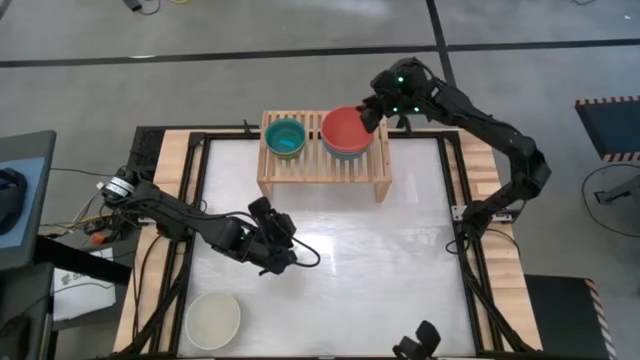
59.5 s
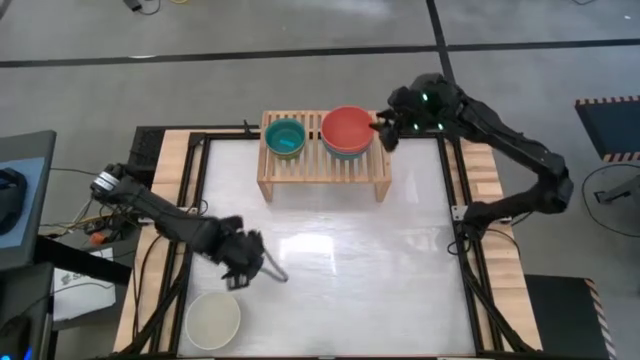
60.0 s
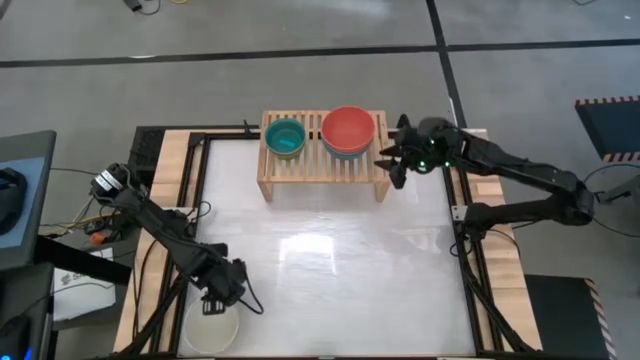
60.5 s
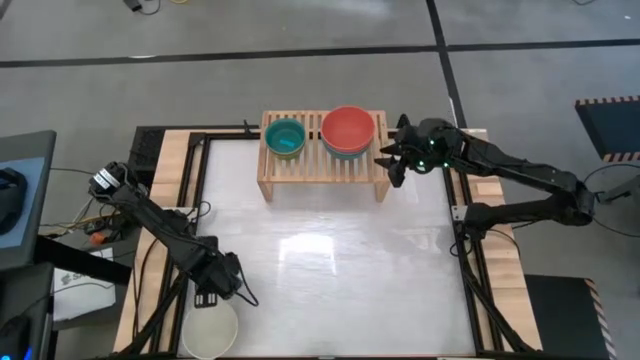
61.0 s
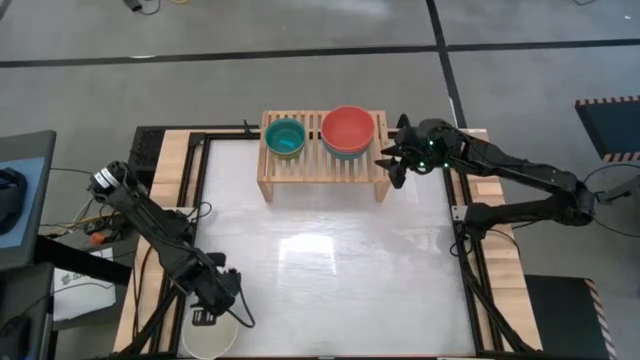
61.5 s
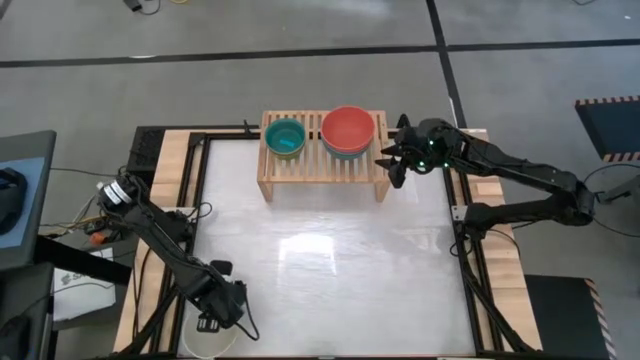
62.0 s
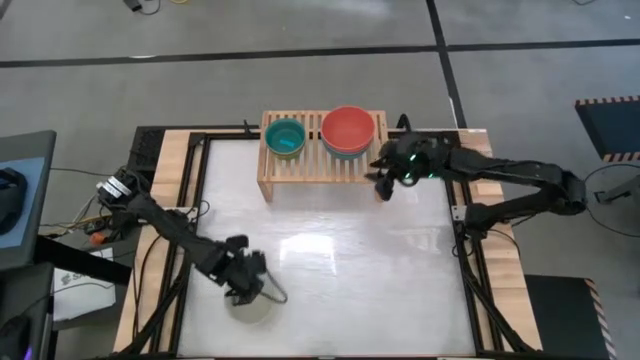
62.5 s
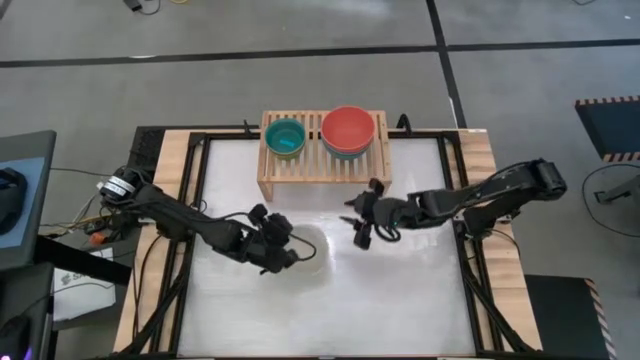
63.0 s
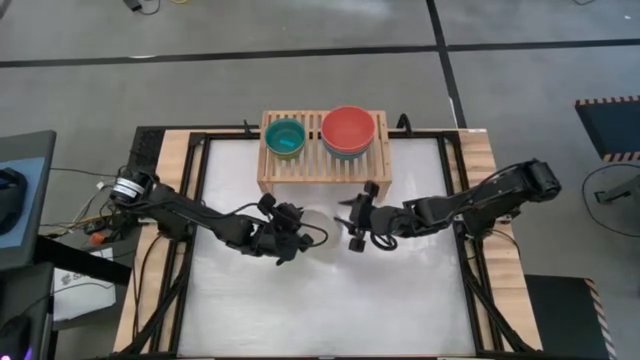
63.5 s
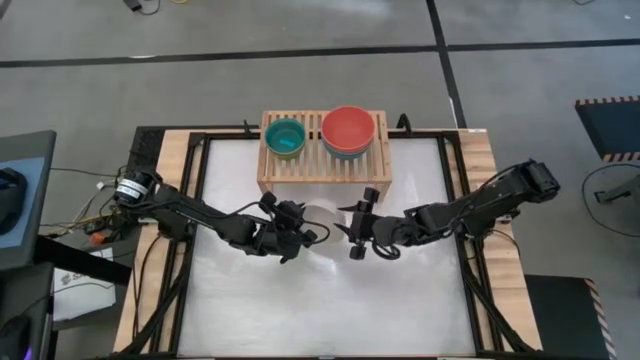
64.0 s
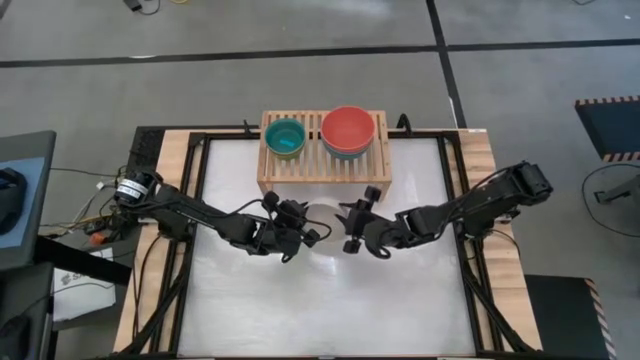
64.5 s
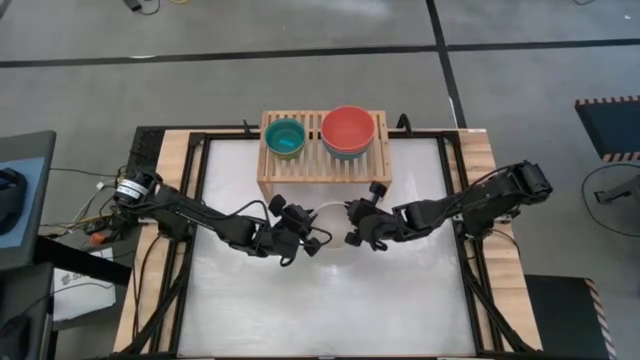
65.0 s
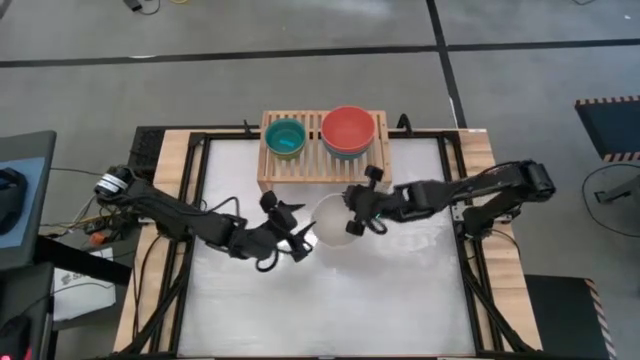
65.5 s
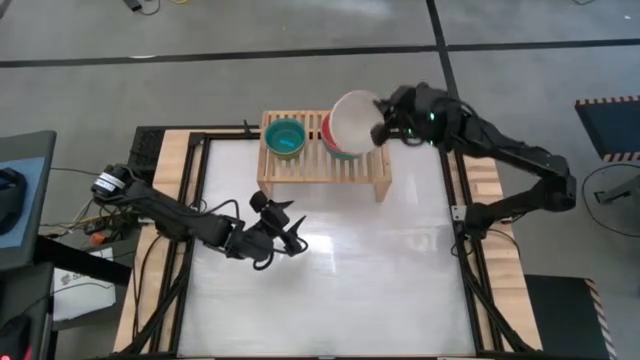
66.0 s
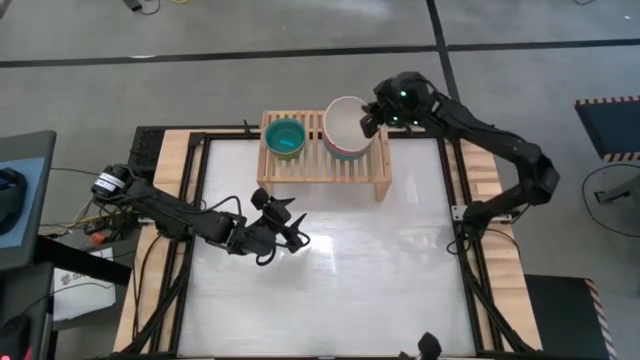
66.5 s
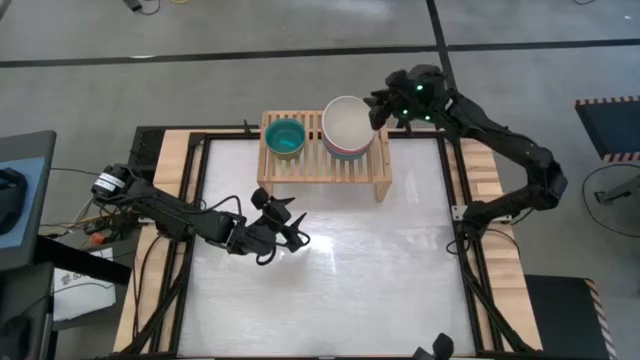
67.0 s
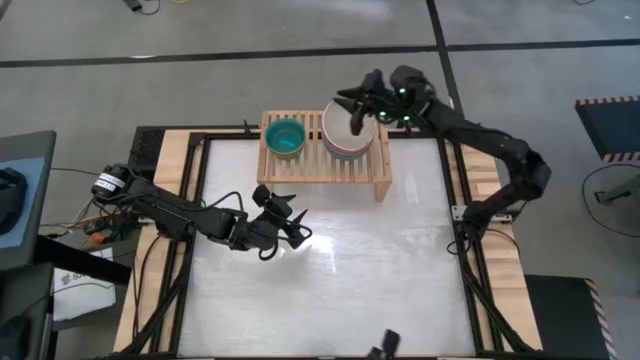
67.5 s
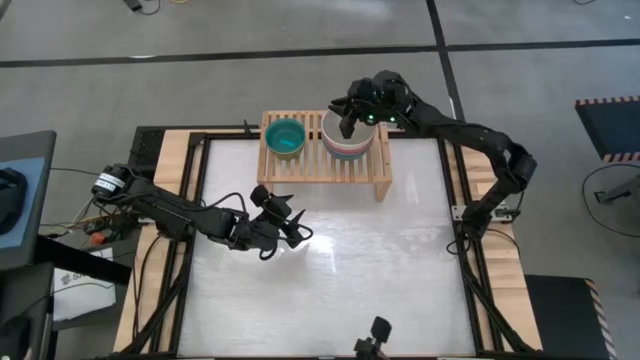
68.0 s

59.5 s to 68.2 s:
Task: Place and stack bowls onto a shelf
Stack the white bowl on top of the orange bowl

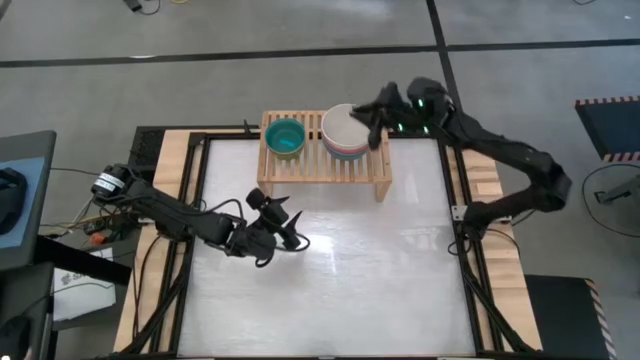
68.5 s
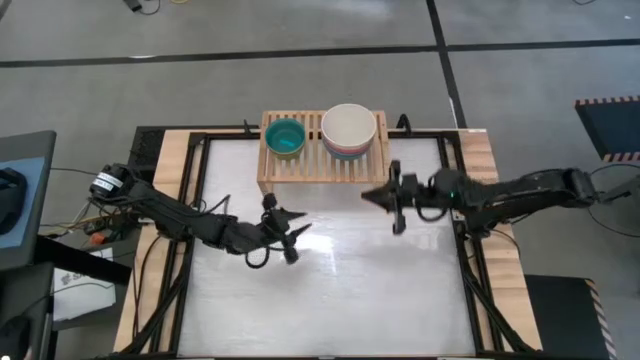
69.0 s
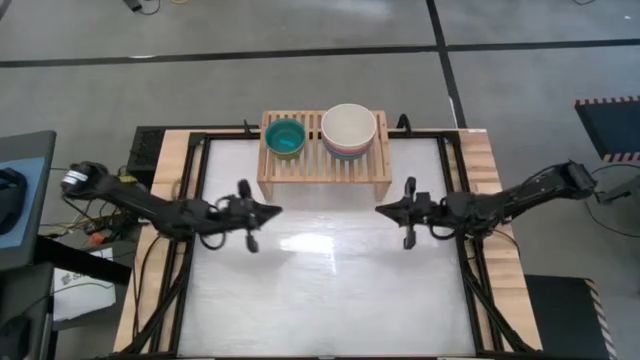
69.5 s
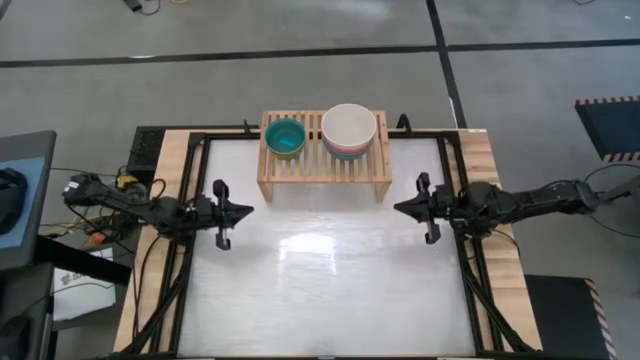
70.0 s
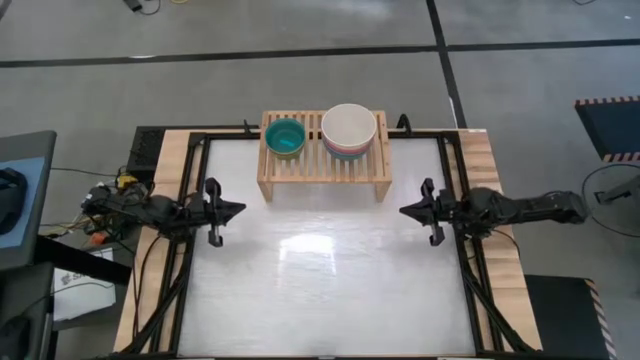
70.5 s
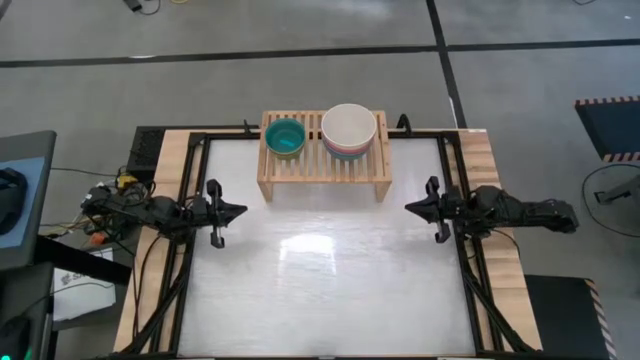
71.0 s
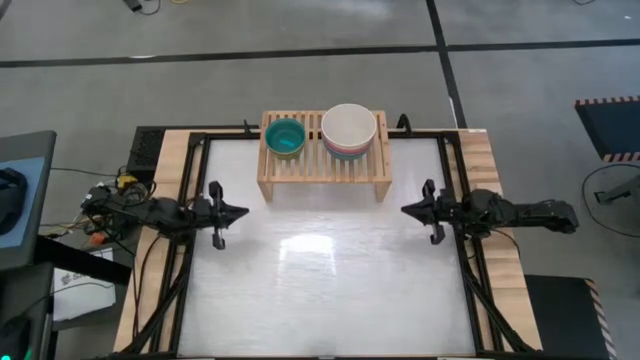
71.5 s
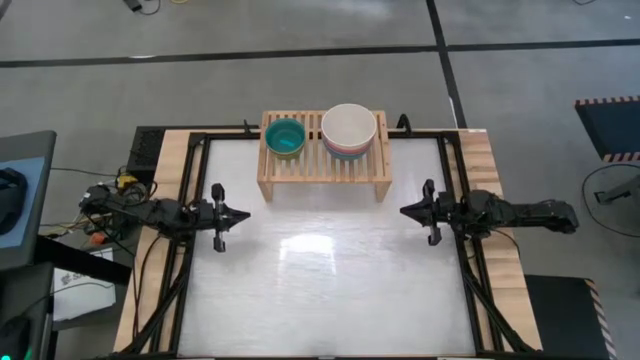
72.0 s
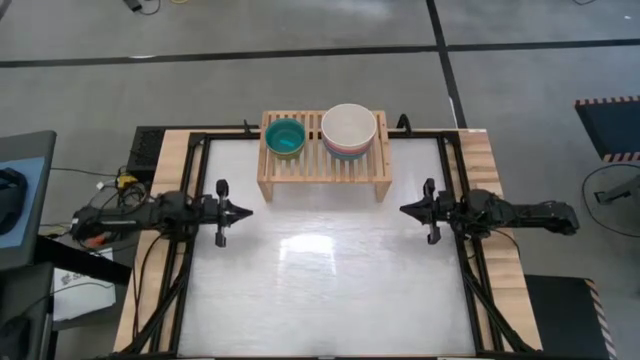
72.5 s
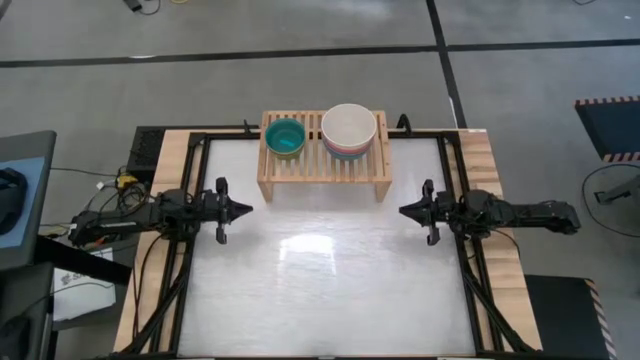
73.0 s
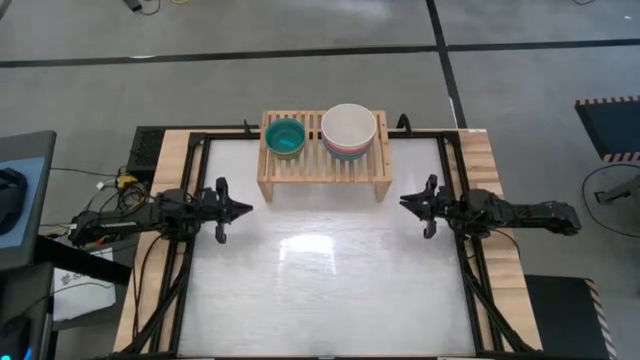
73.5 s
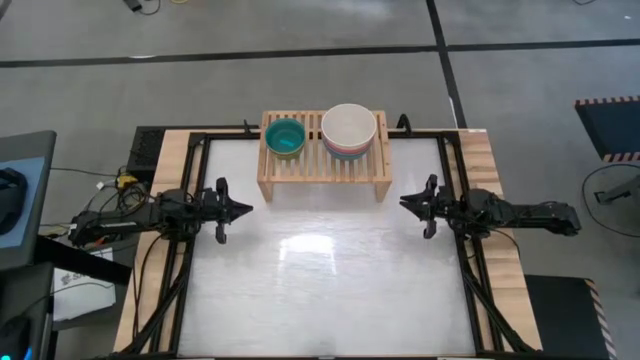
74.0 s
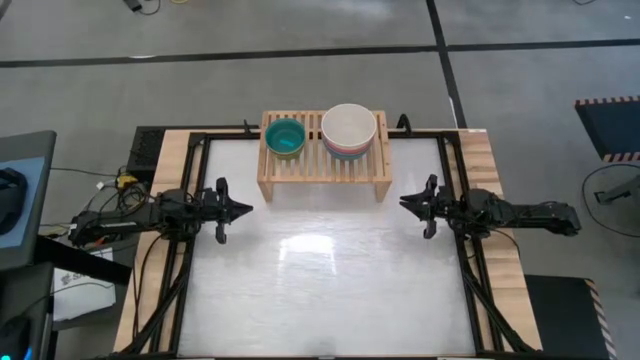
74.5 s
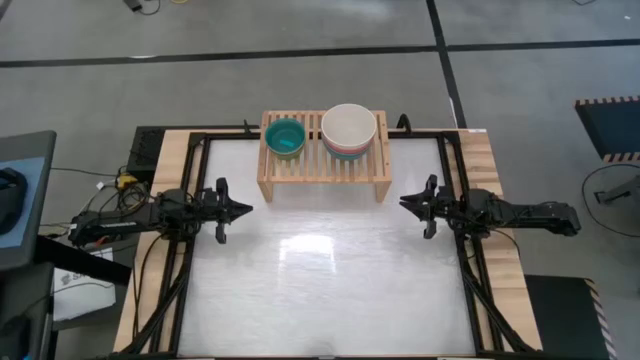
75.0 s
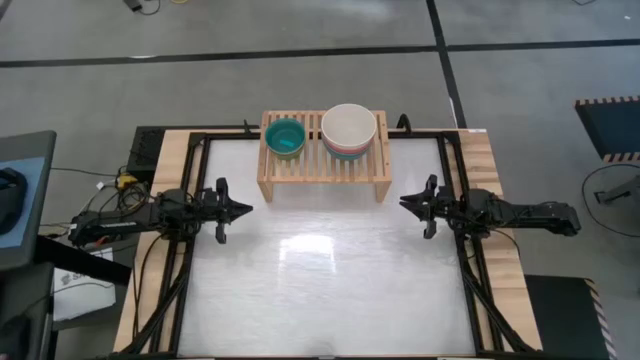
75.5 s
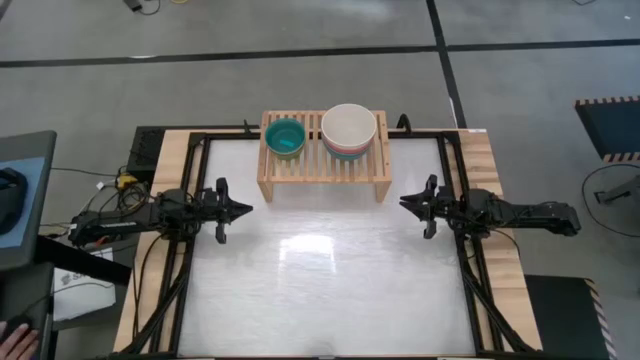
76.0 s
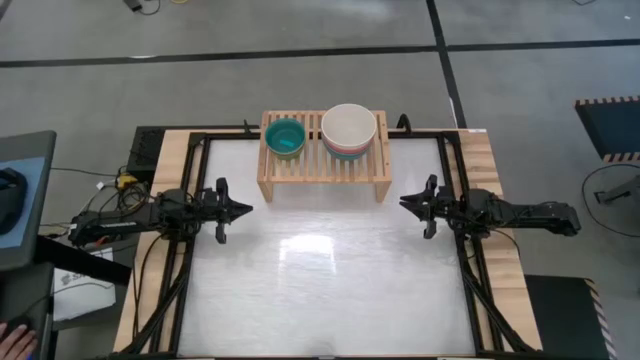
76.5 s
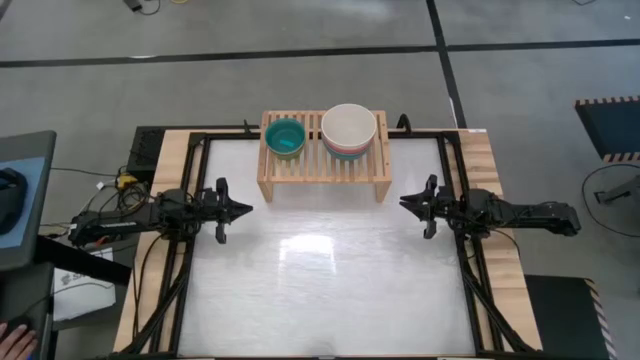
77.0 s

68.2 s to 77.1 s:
Return to Home Position

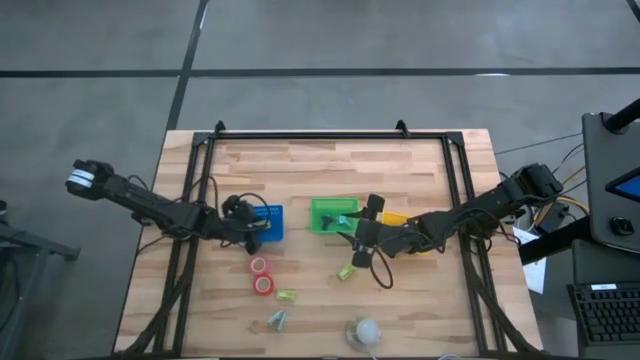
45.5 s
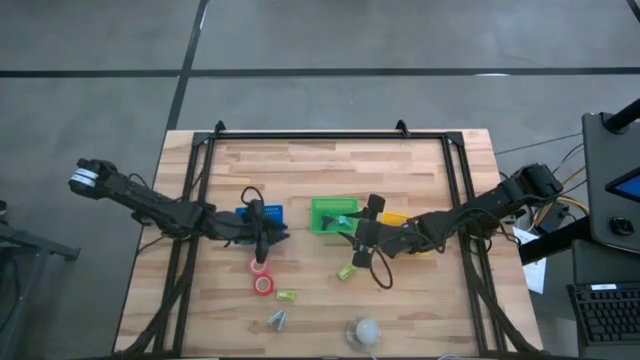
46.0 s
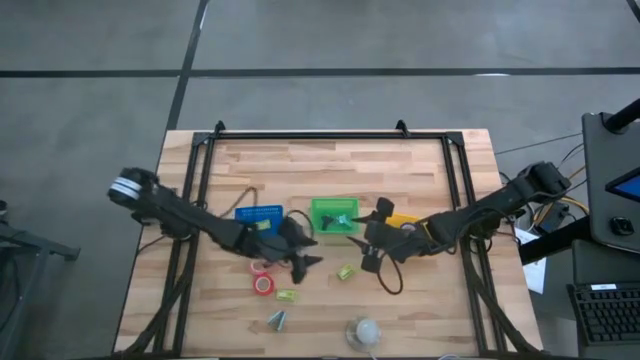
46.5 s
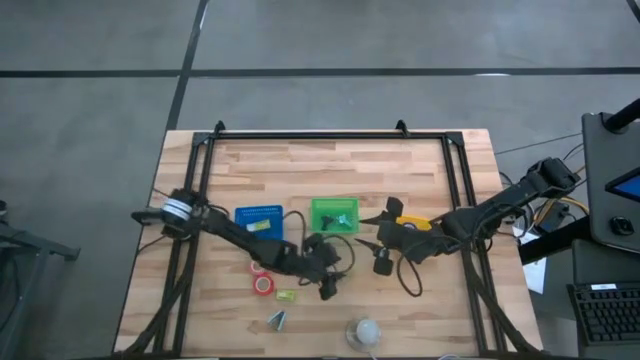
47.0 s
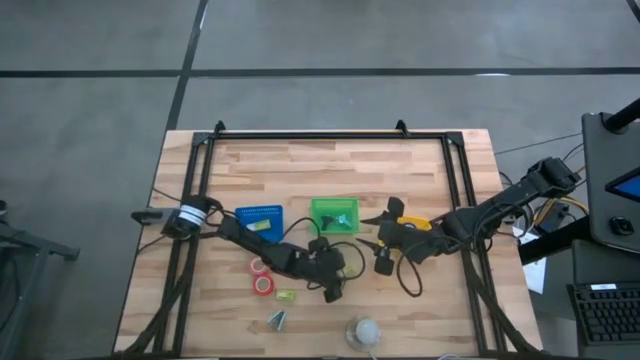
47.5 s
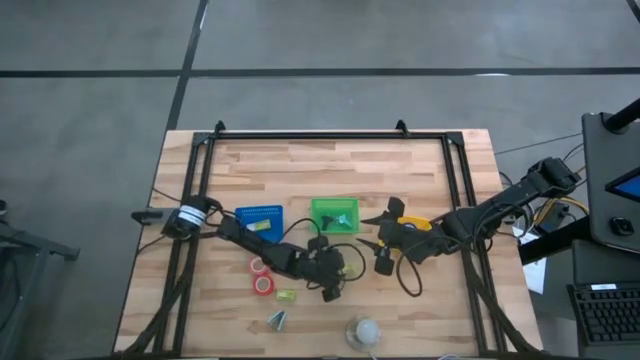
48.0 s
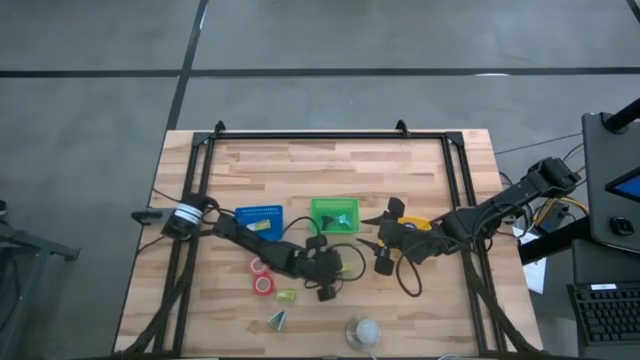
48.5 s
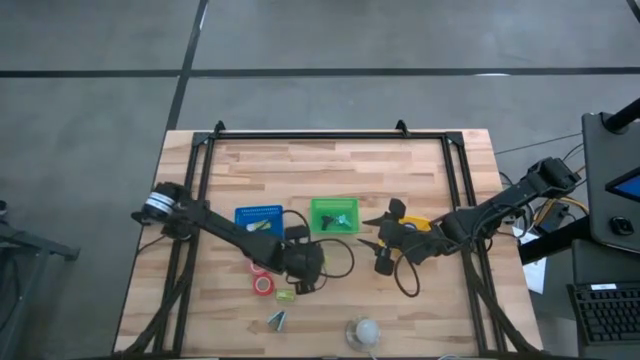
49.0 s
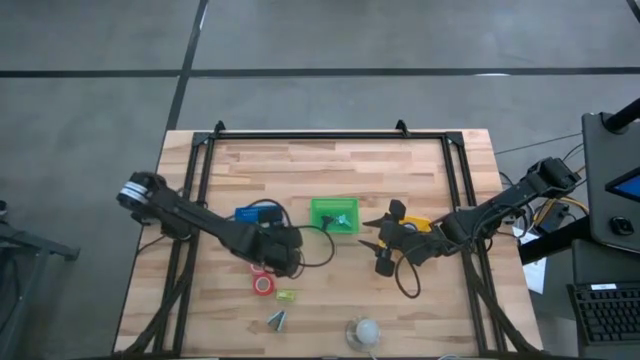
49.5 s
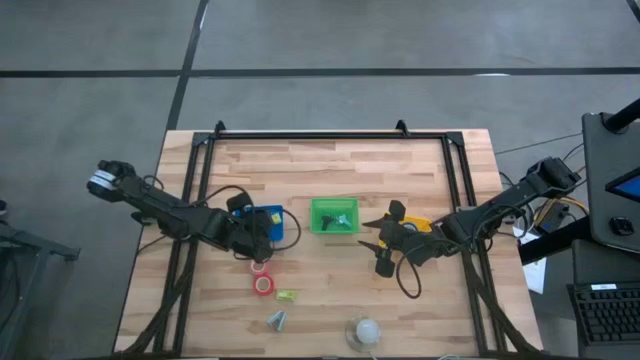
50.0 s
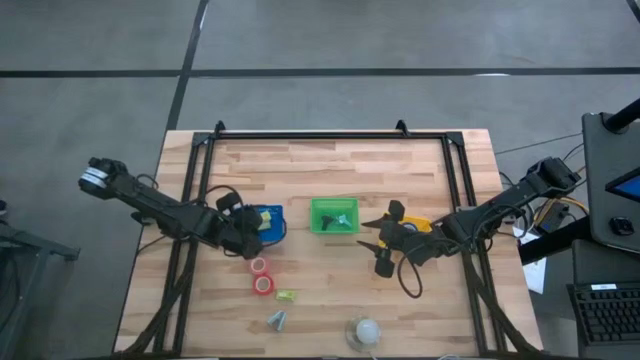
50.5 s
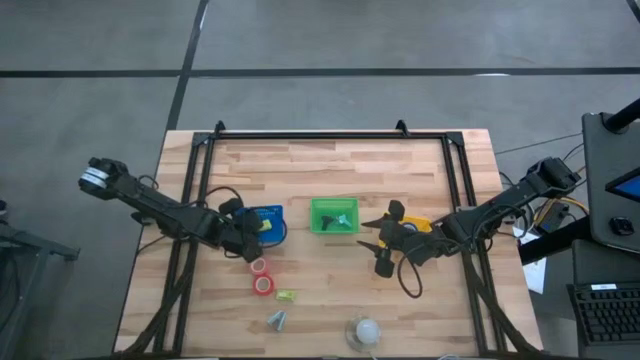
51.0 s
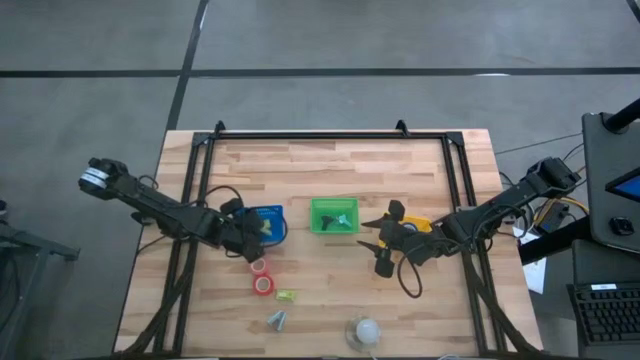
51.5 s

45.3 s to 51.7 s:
Task: Pick and place Stapler, Stapler remover, tape
Put the top staple pin box into the blue bin
